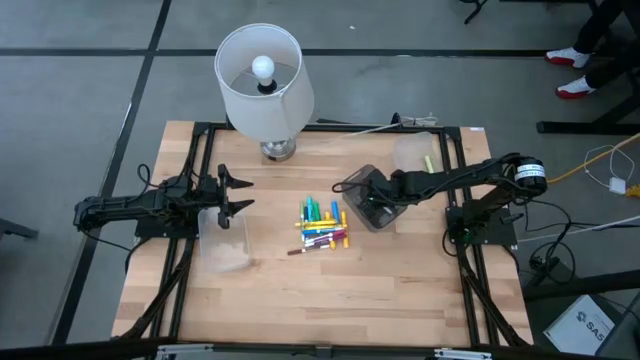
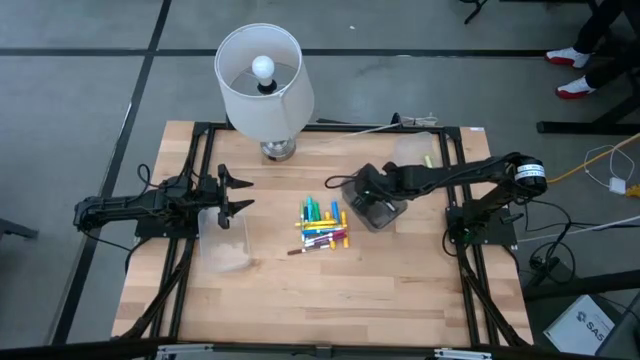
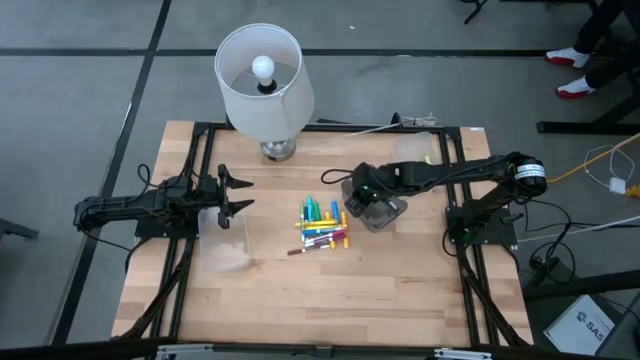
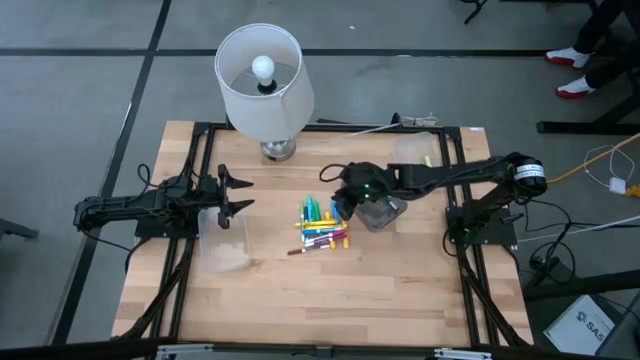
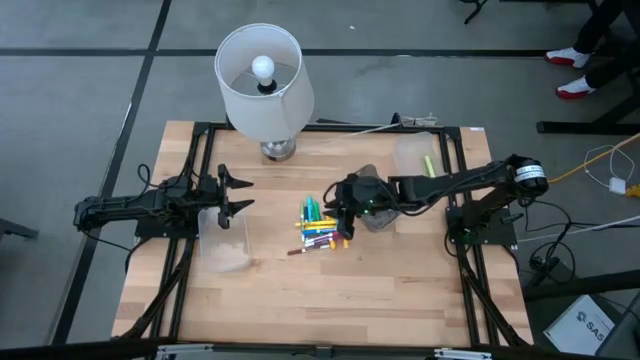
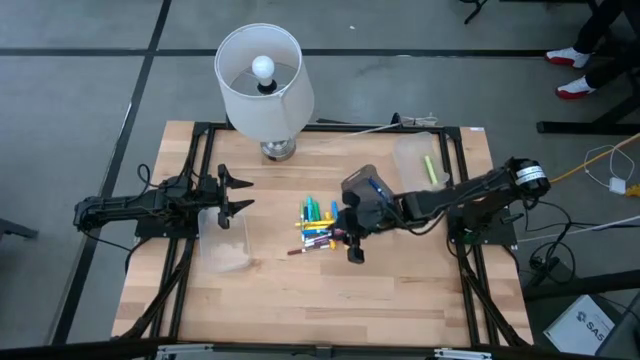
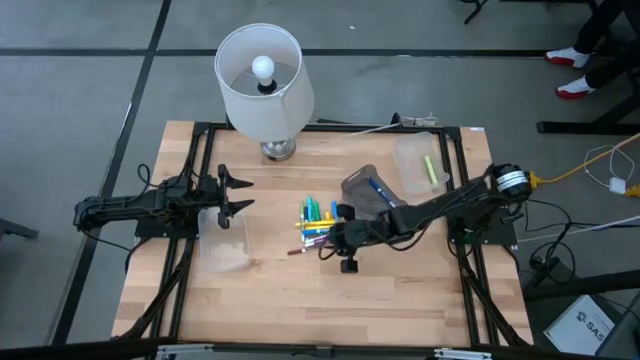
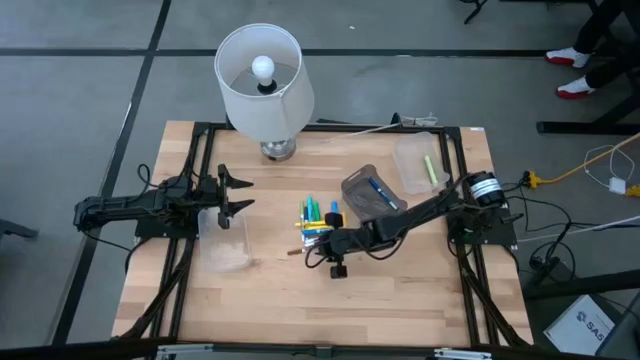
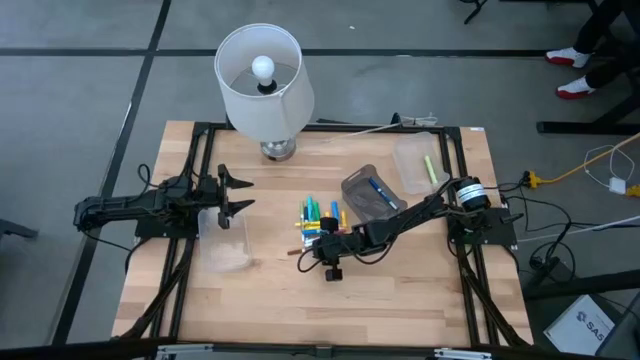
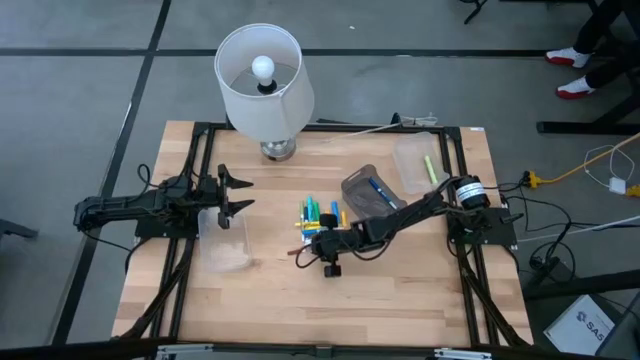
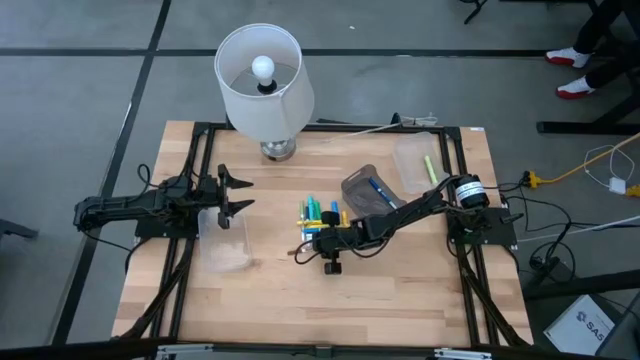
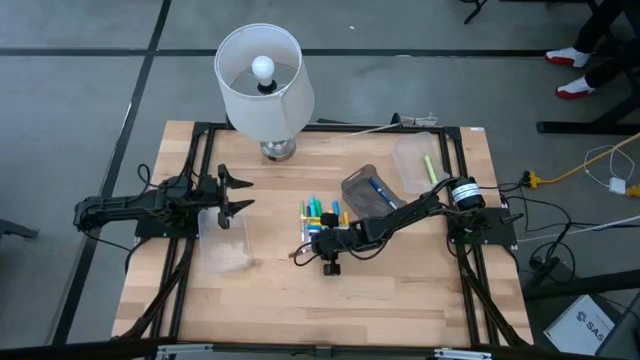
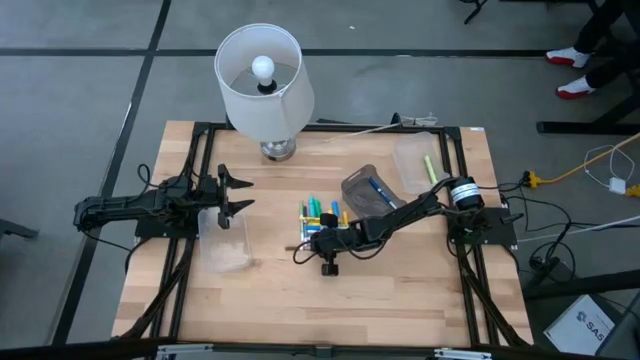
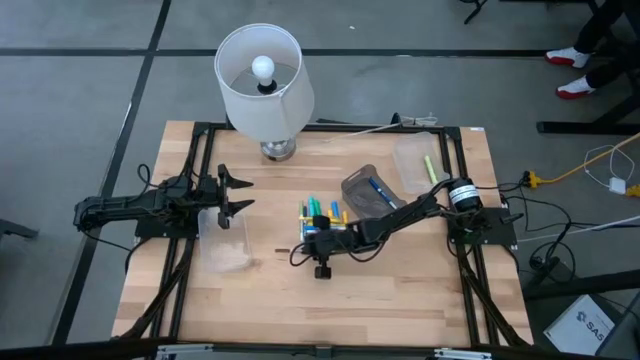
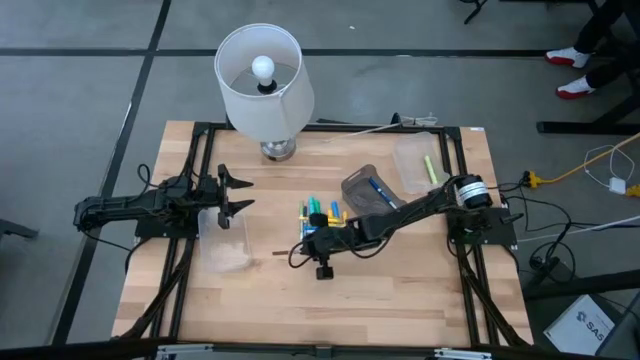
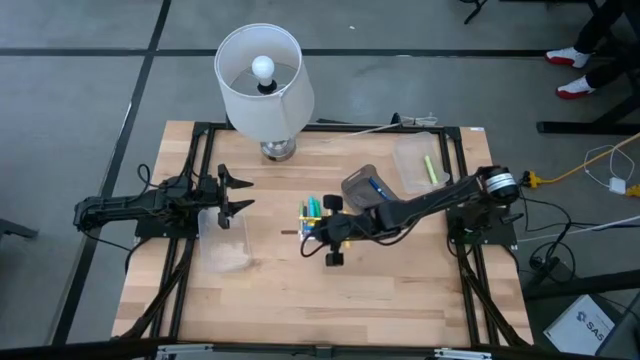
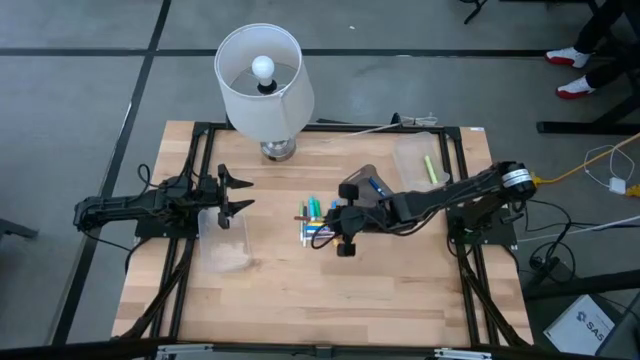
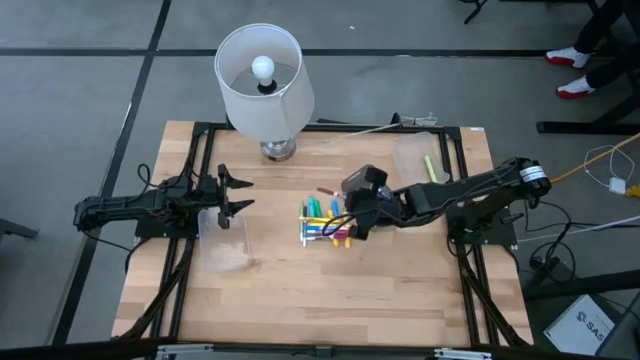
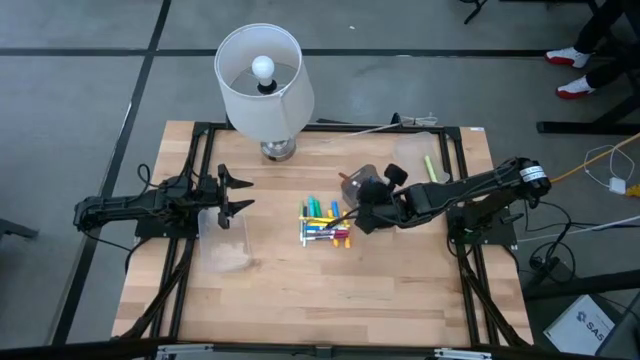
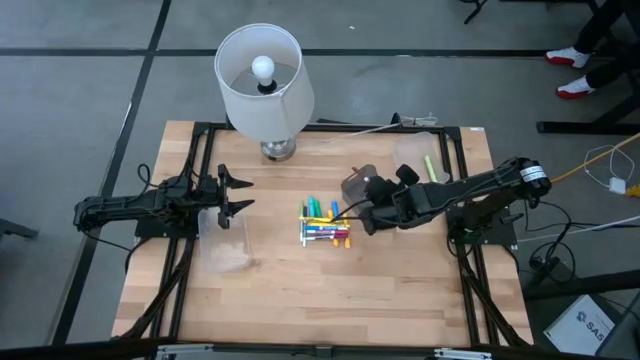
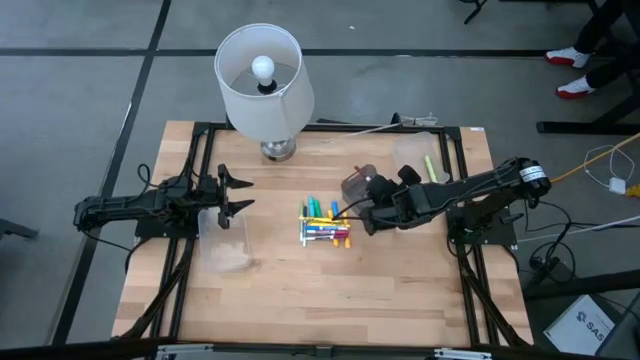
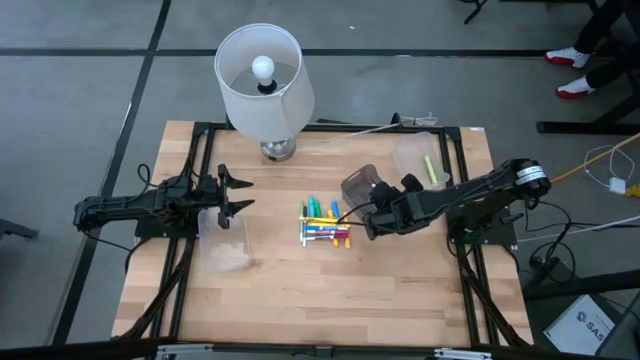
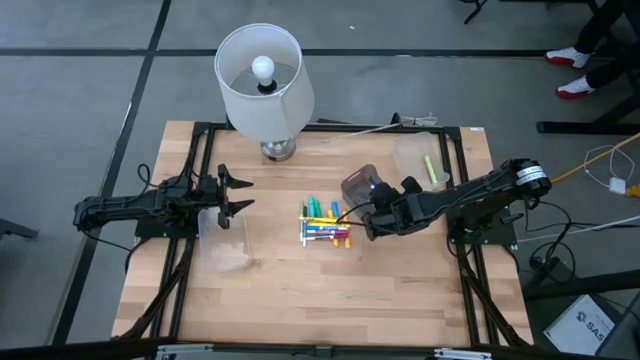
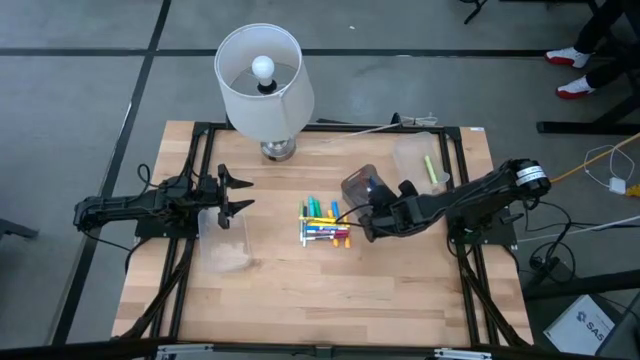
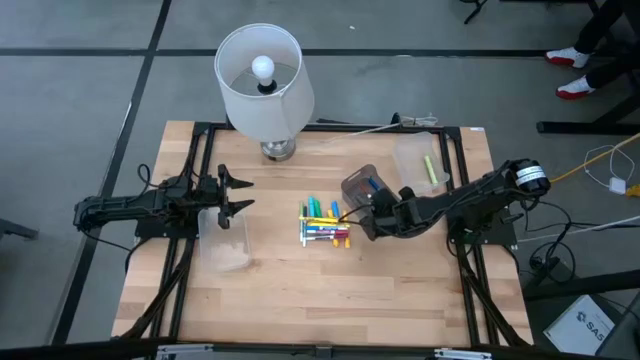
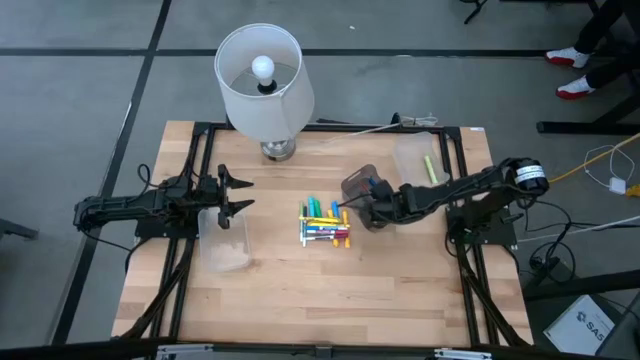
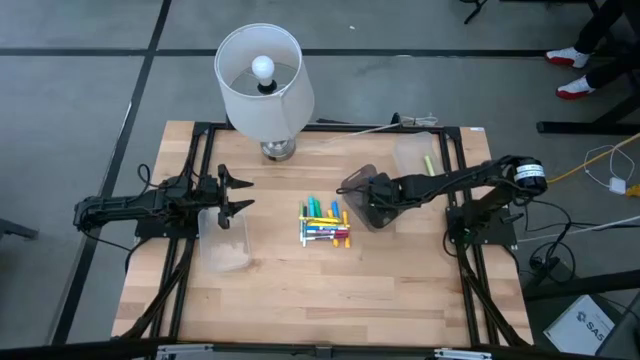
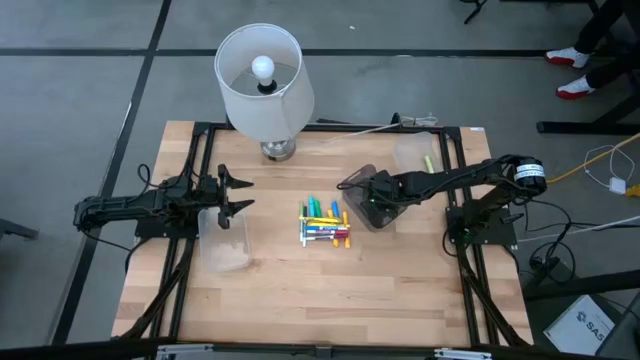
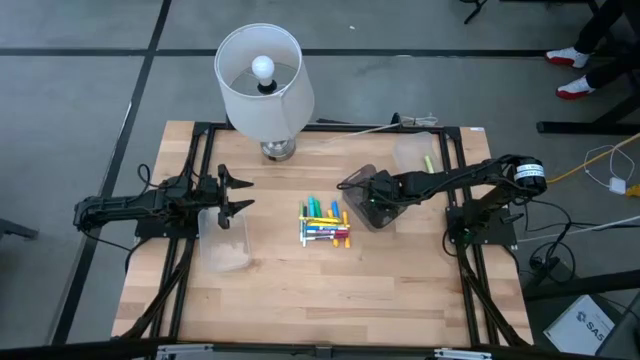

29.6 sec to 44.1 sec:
Task: Pick & Place Markers
Put the brown marker pen into the black bin

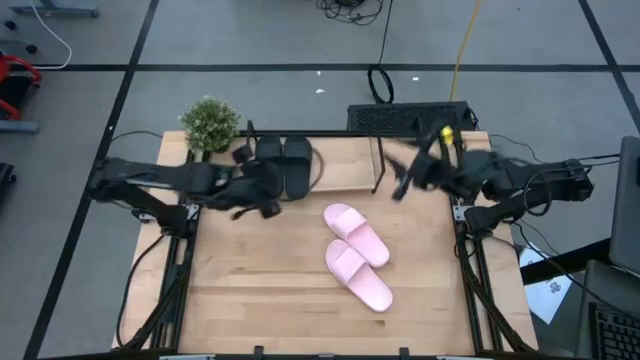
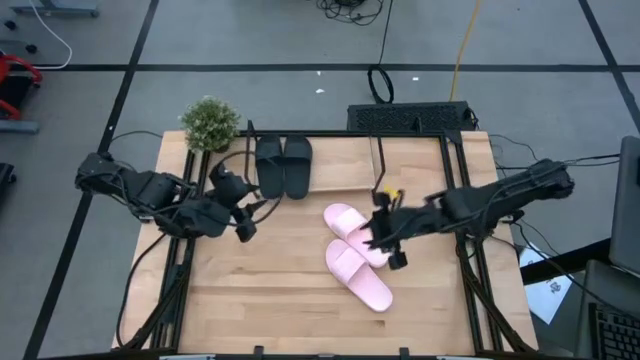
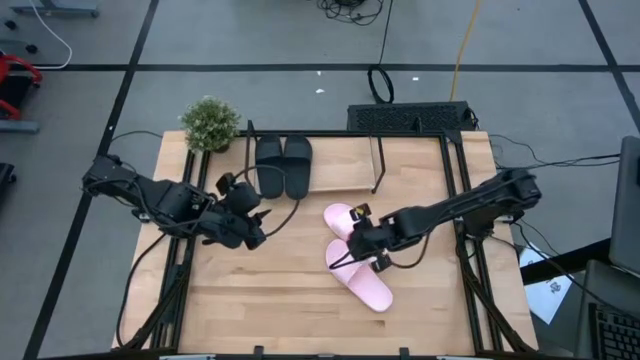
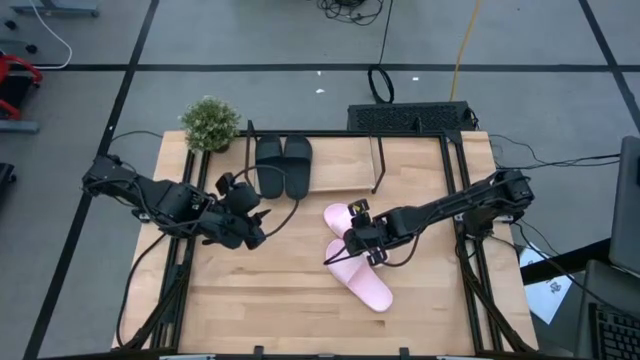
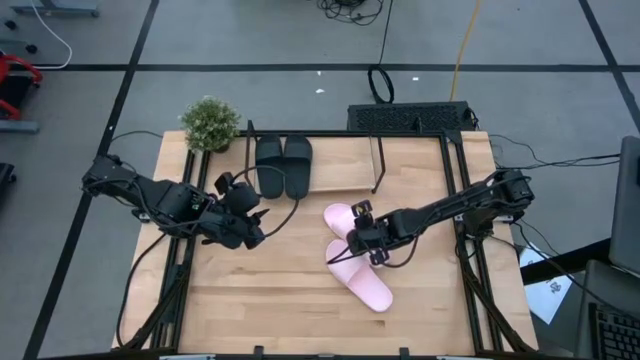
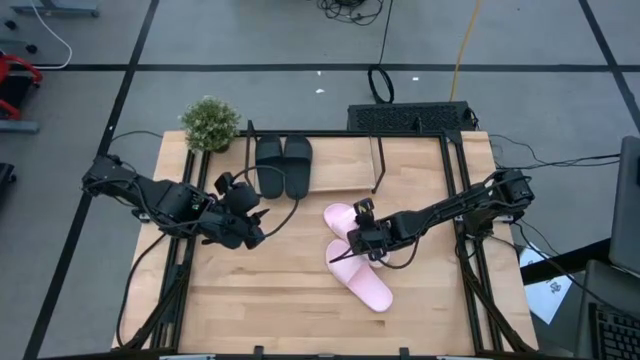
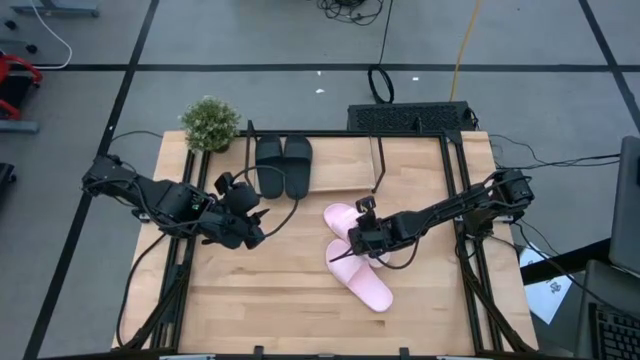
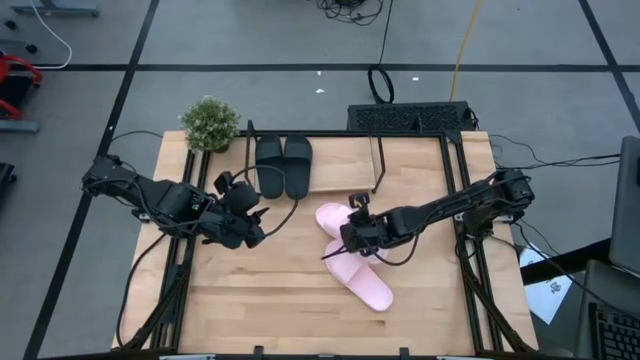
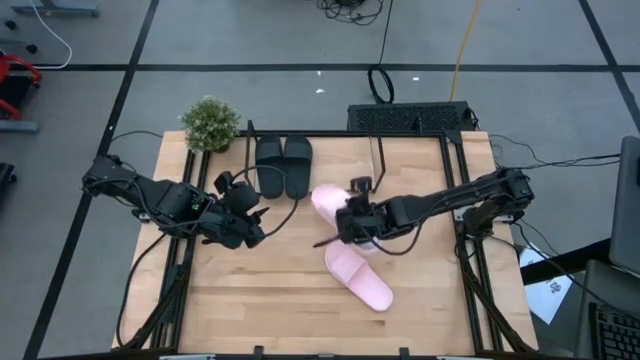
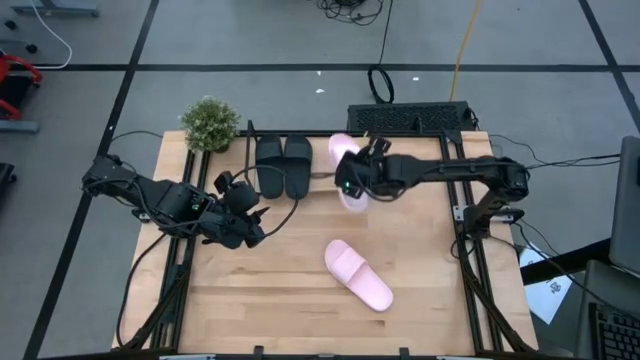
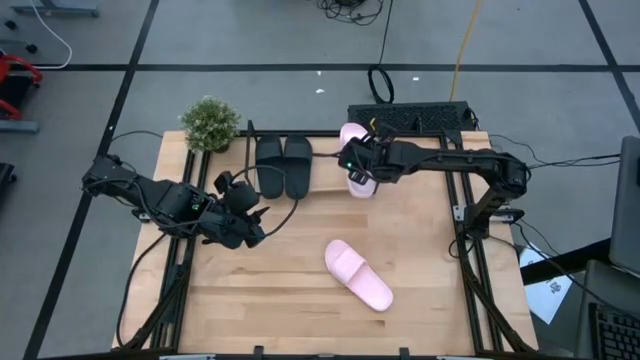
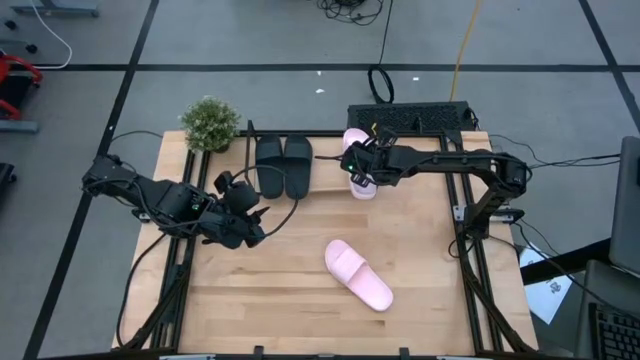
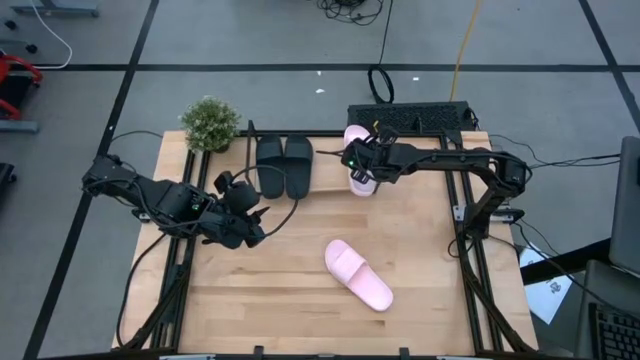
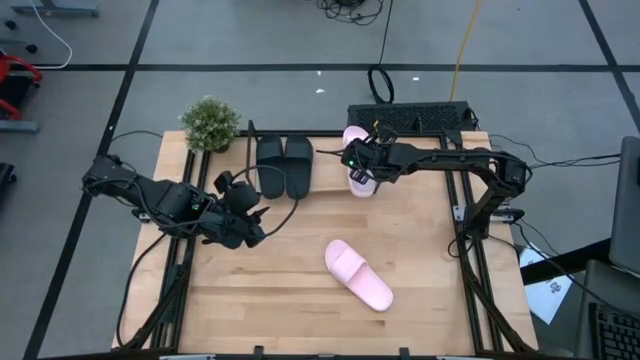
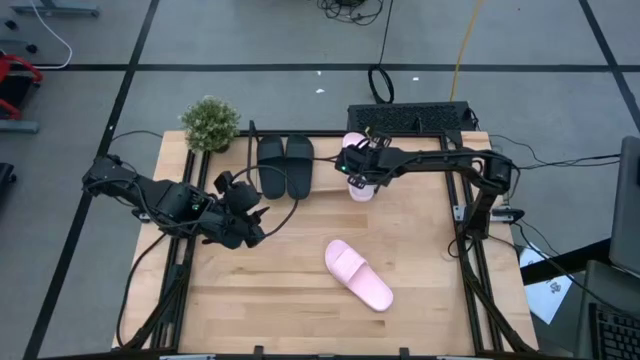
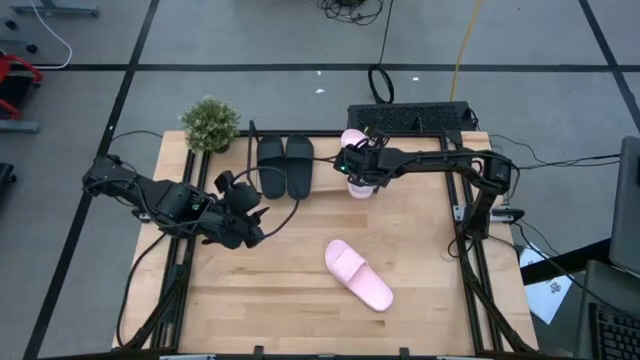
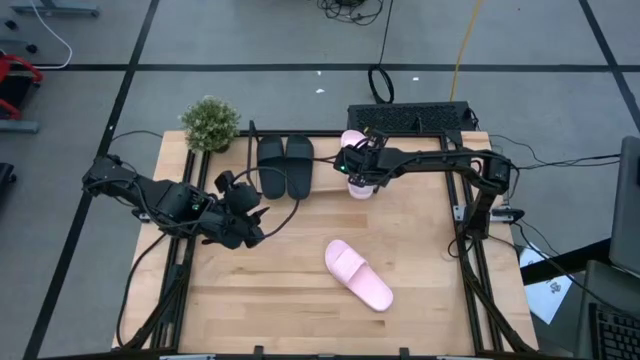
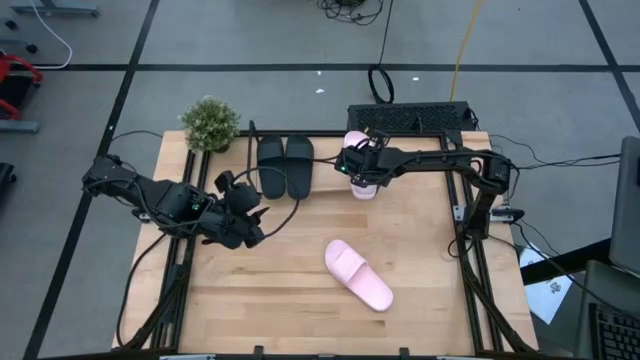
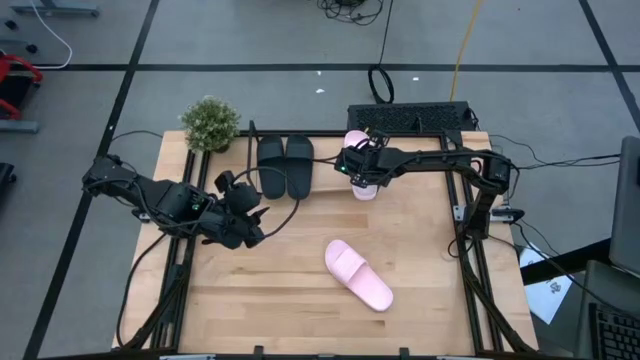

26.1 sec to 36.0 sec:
Task: Pick and place slides into the shelf
Put the top pink slipper on the shelf
